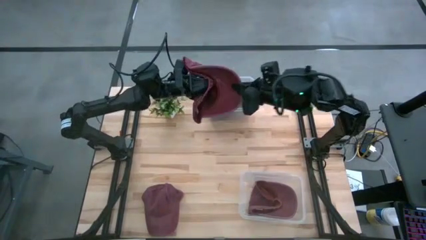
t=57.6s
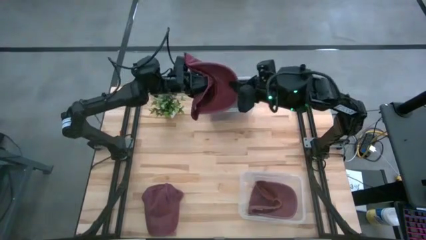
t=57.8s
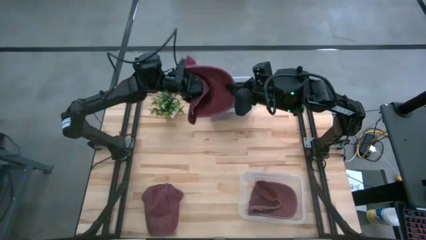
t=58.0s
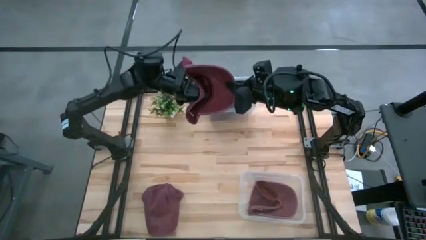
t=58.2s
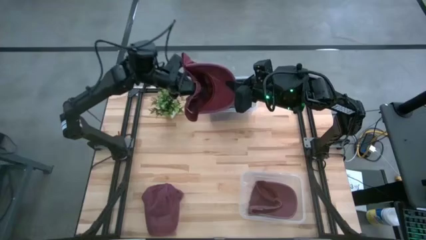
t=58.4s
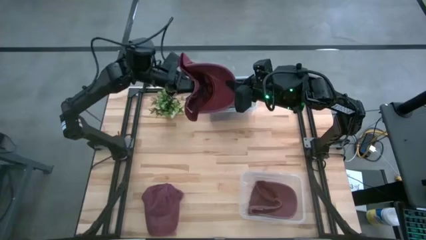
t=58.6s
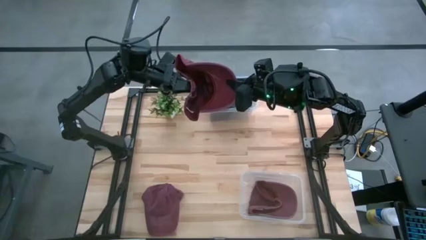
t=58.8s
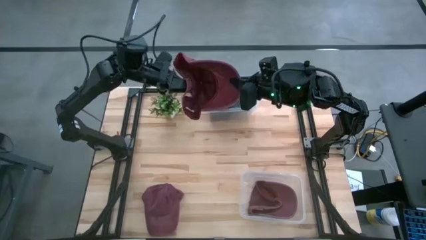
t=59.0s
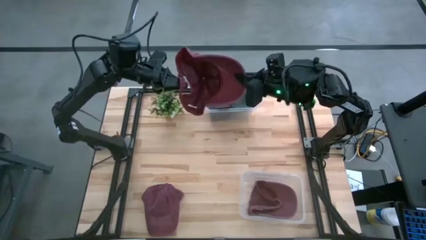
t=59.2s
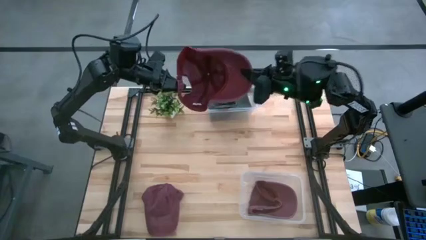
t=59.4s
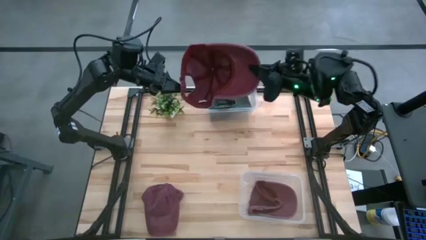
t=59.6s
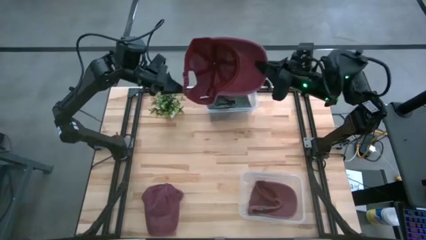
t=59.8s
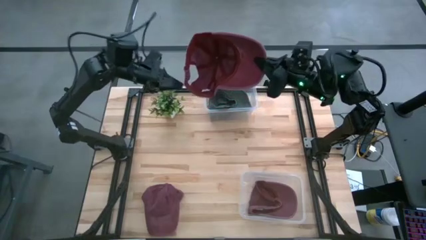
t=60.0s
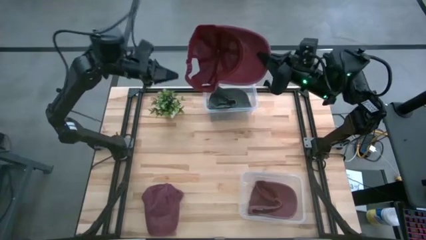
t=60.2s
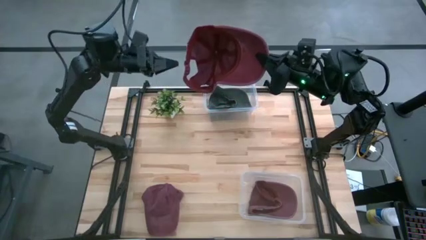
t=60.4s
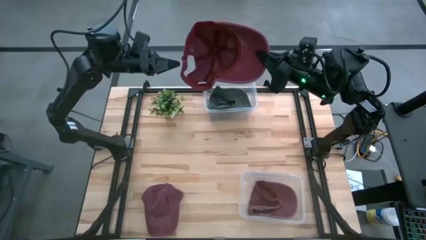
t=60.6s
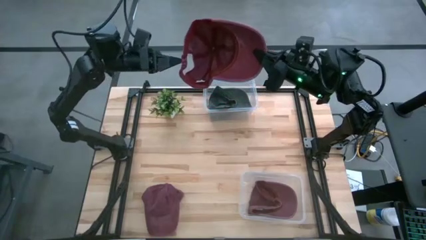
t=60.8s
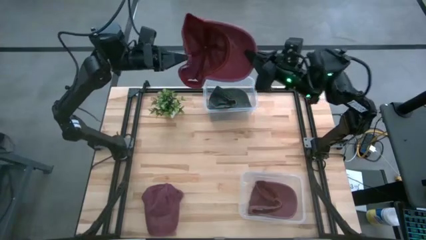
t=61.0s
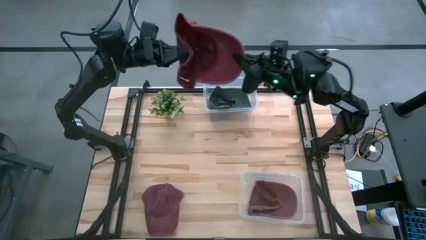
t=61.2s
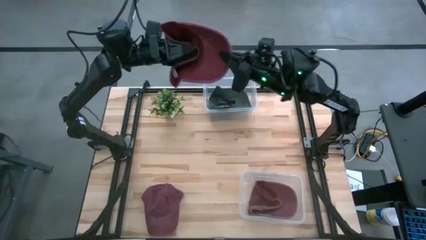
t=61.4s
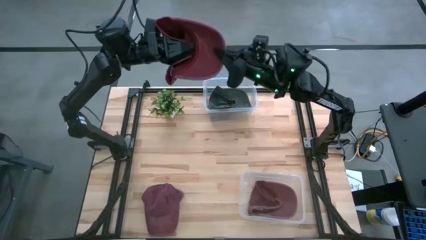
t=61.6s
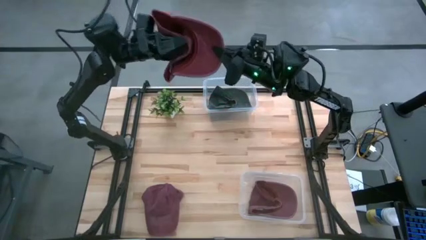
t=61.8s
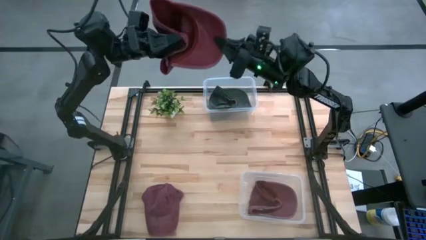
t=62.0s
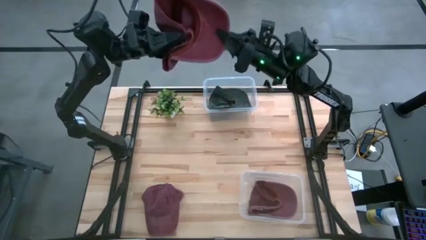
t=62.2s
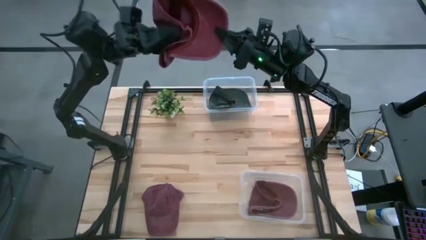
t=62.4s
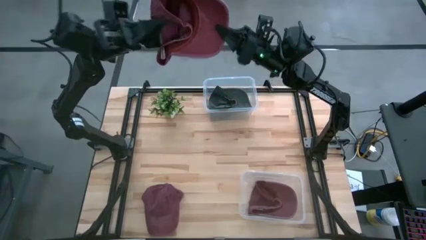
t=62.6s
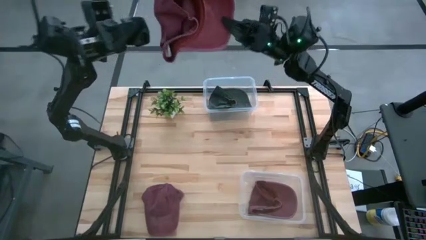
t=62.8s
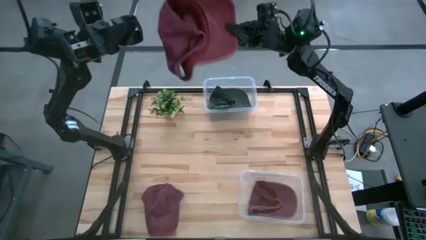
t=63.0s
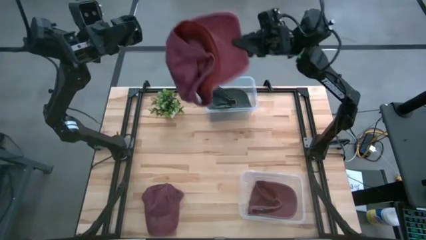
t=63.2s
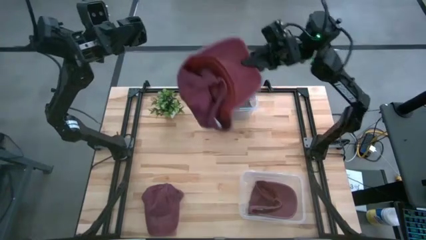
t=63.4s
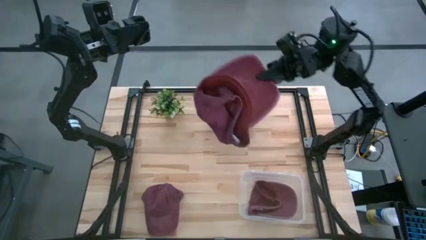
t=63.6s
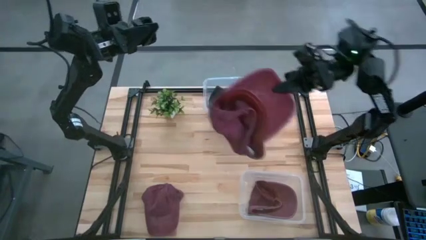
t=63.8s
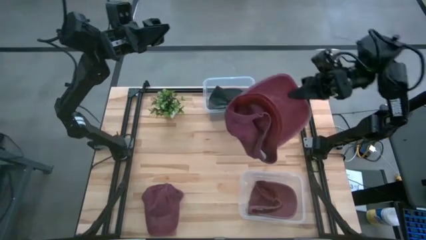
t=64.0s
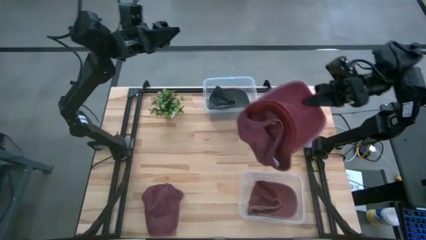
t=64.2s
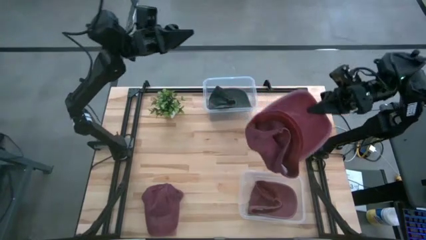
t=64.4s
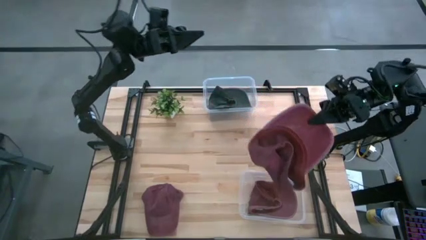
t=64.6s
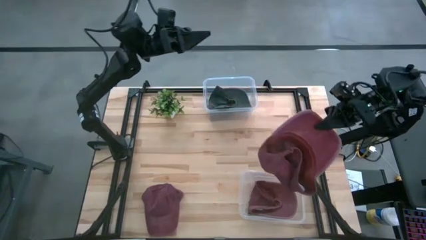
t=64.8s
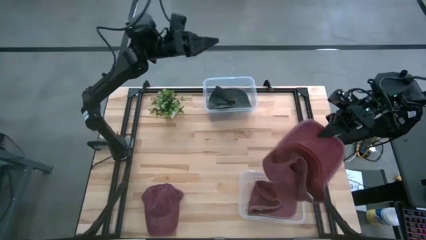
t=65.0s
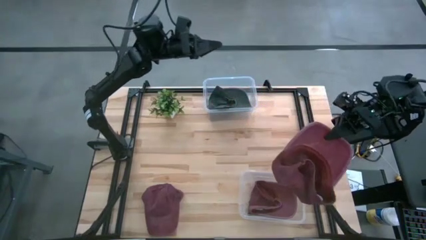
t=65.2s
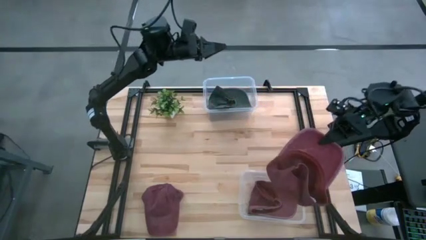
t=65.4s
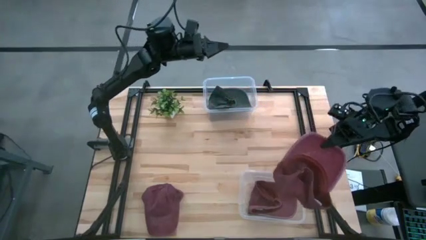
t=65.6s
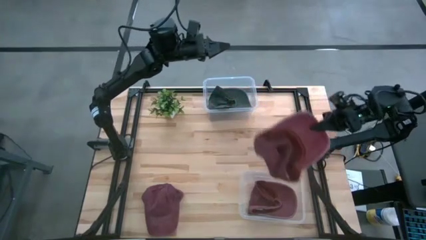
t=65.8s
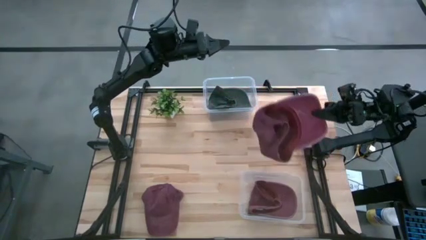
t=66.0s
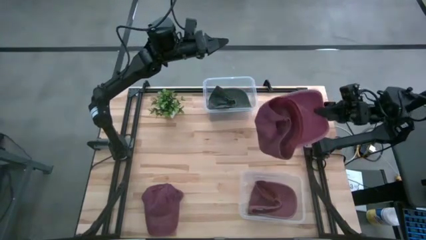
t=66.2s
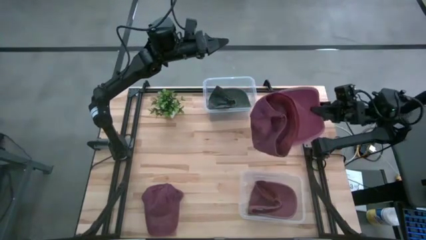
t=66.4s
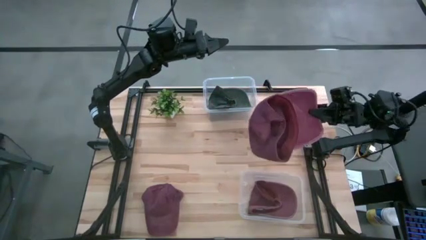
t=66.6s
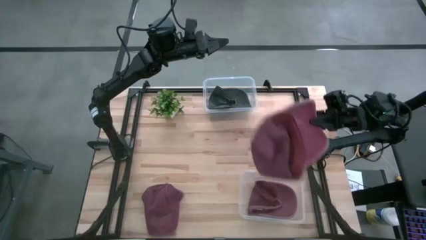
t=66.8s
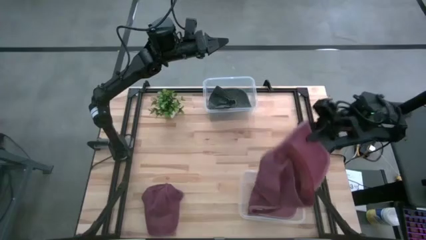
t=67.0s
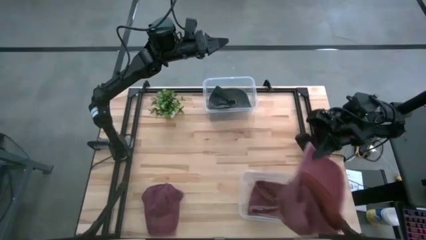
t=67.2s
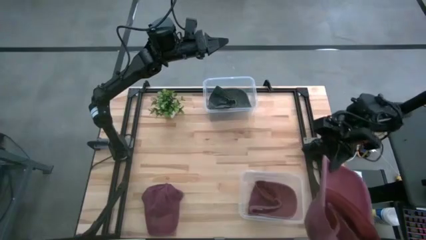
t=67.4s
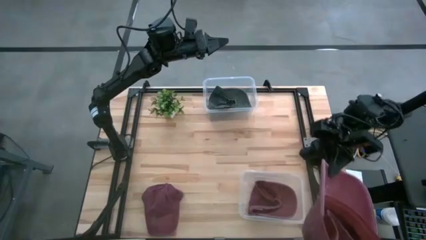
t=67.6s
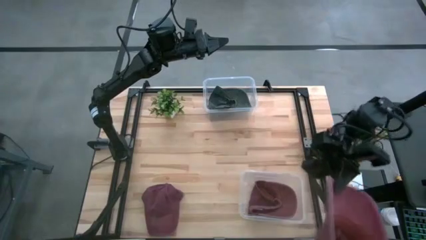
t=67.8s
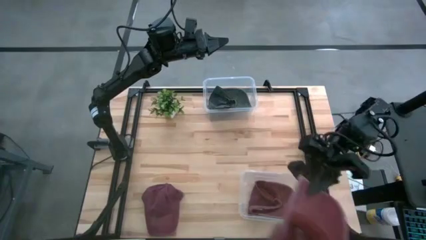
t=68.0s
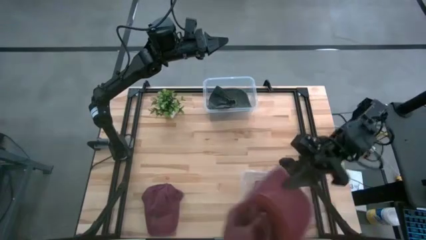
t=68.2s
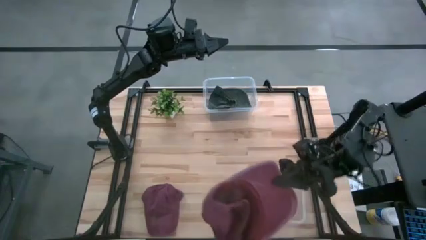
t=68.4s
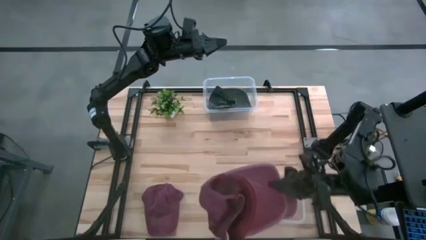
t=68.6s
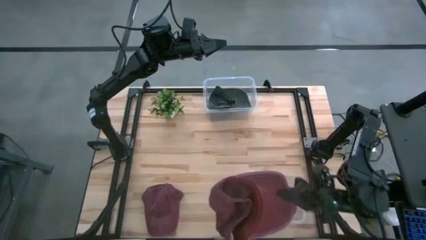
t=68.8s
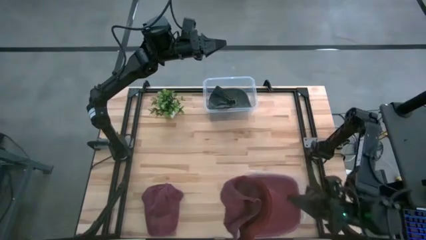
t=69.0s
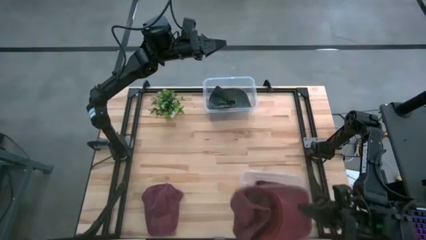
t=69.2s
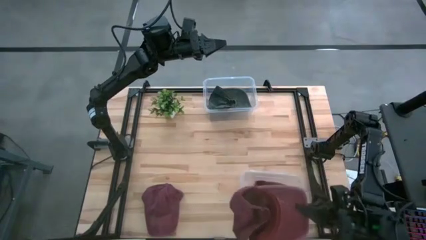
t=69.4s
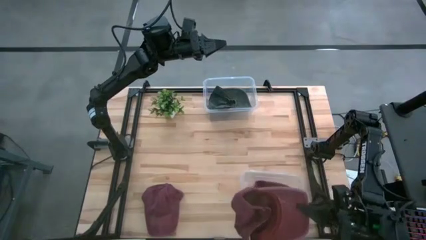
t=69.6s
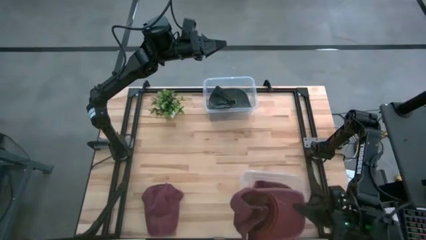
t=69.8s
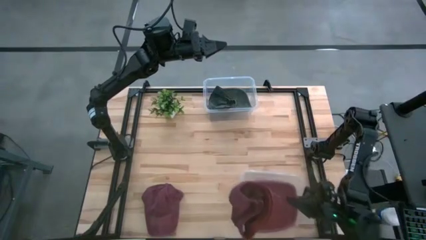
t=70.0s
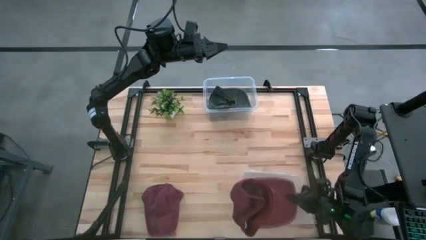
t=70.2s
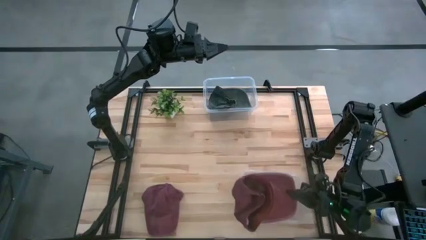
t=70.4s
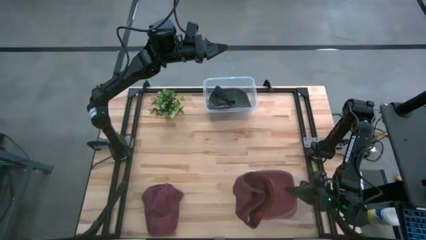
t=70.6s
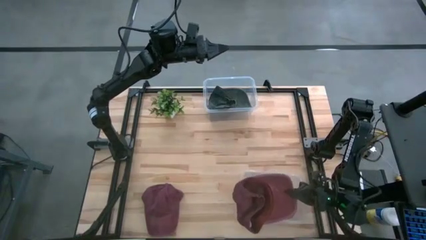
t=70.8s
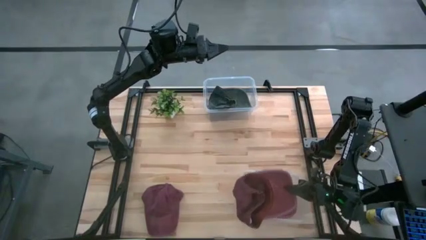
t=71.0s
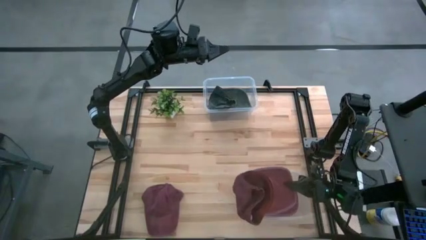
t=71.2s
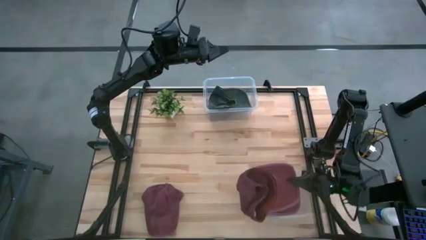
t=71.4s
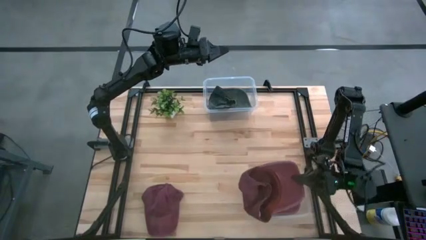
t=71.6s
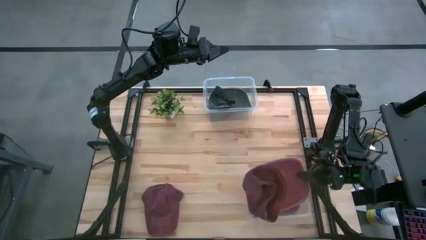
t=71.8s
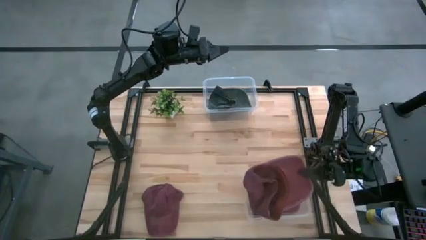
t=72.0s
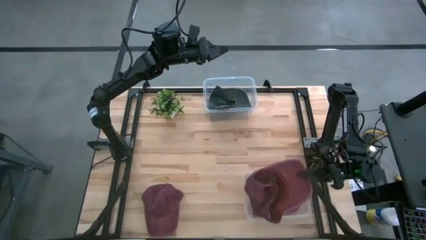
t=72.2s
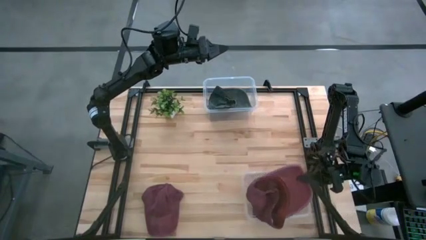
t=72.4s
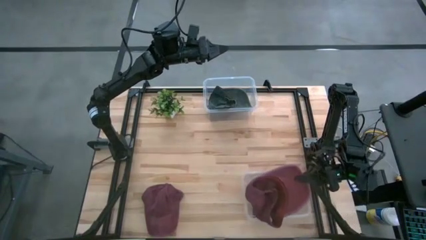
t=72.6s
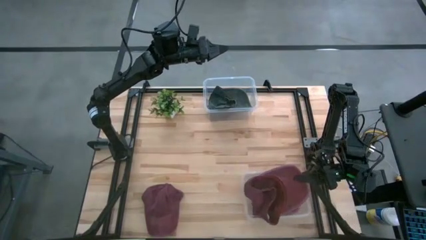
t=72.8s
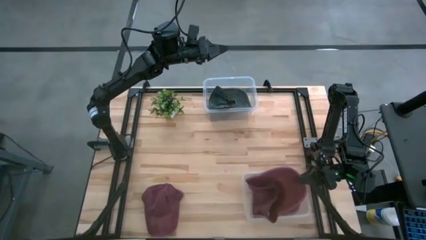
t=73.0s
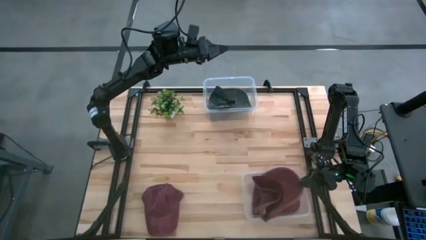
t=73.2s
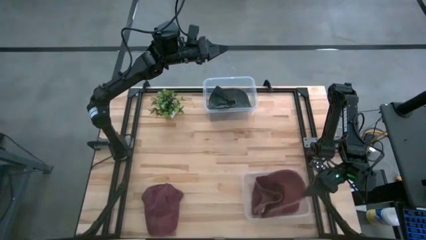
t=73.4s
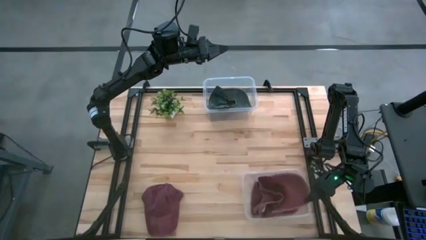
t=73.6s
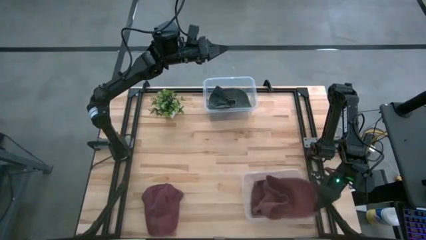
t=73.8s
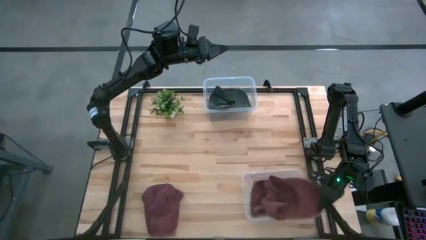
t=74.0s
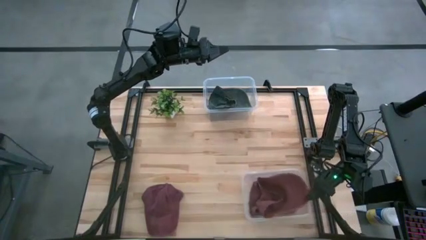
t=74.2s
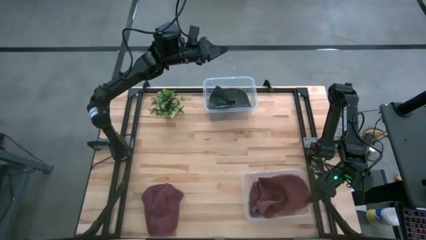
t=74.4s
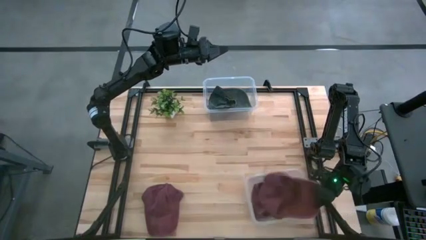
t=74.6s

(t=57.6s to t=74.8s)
Task: Pick & Place hat
Put the maroon cap into the bottom transparent bin
